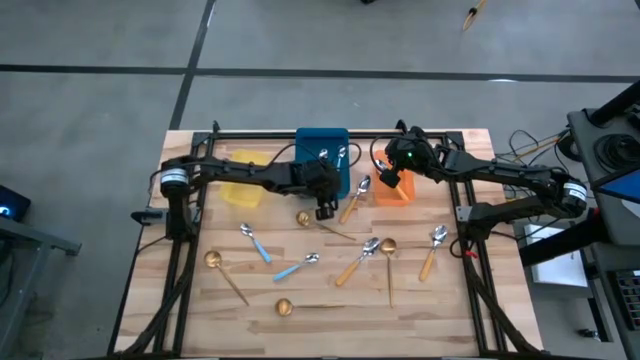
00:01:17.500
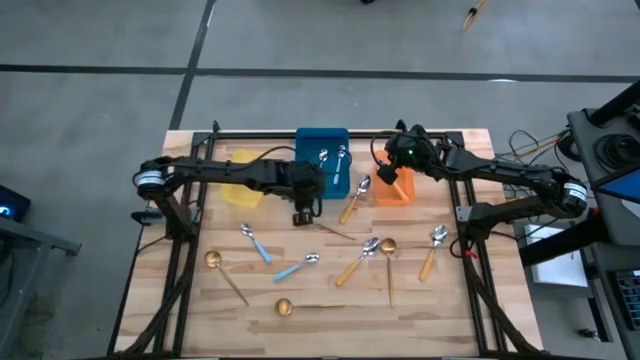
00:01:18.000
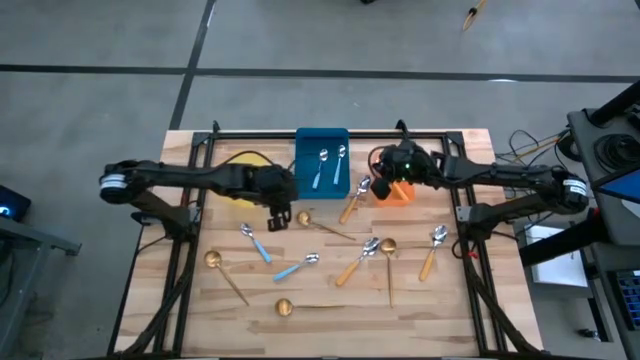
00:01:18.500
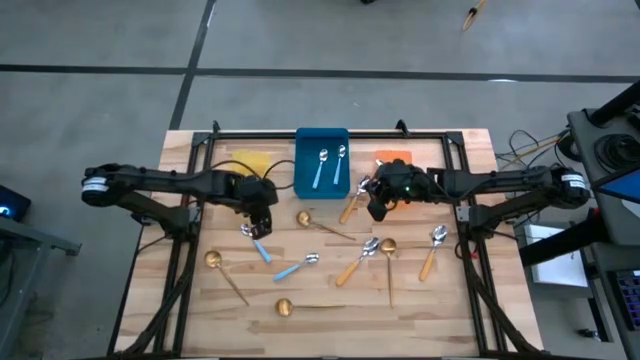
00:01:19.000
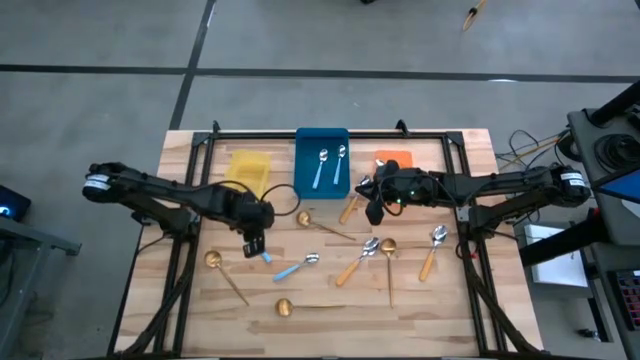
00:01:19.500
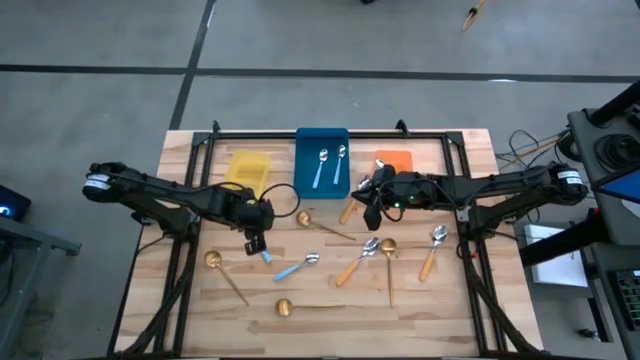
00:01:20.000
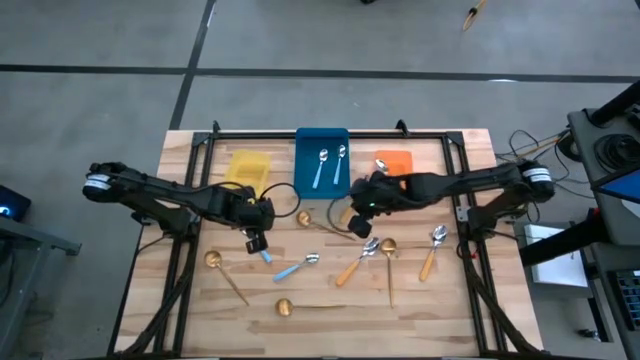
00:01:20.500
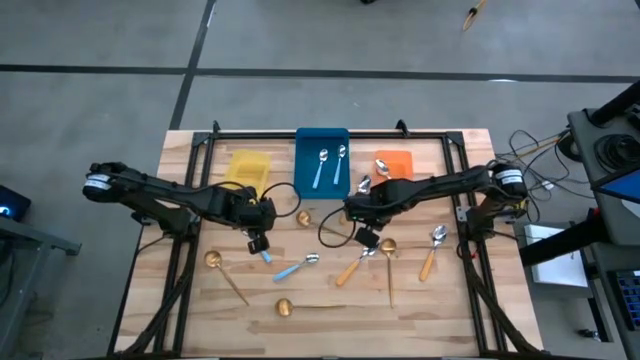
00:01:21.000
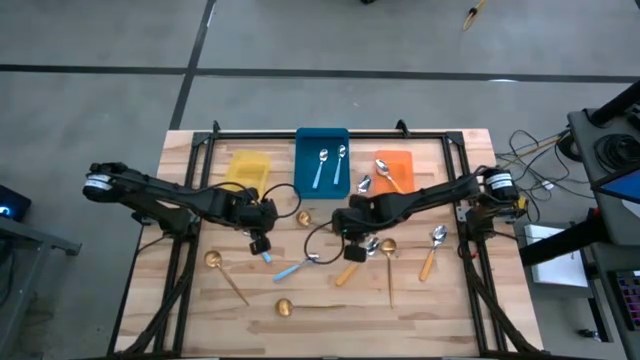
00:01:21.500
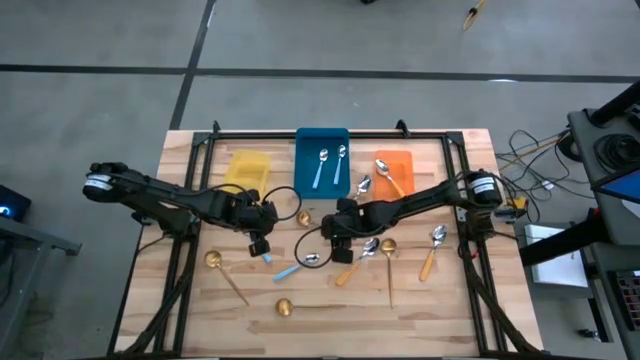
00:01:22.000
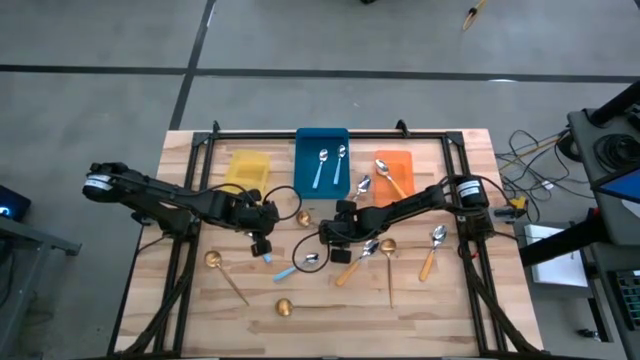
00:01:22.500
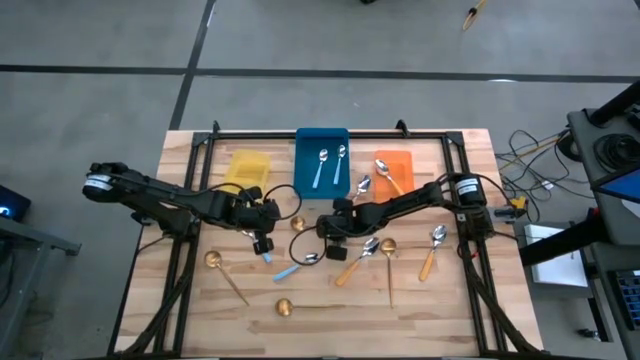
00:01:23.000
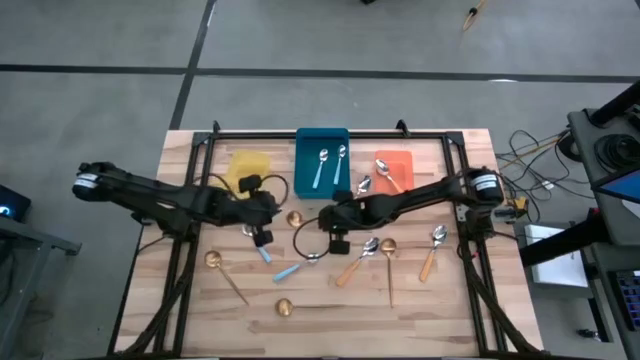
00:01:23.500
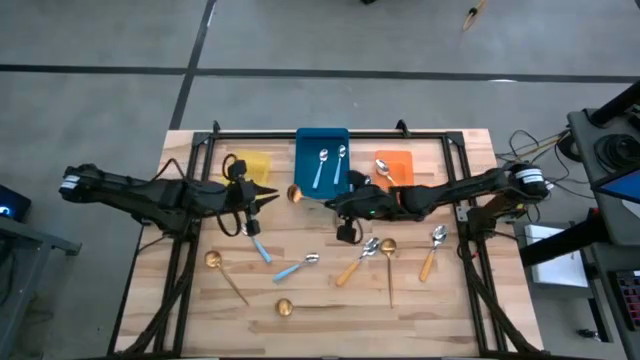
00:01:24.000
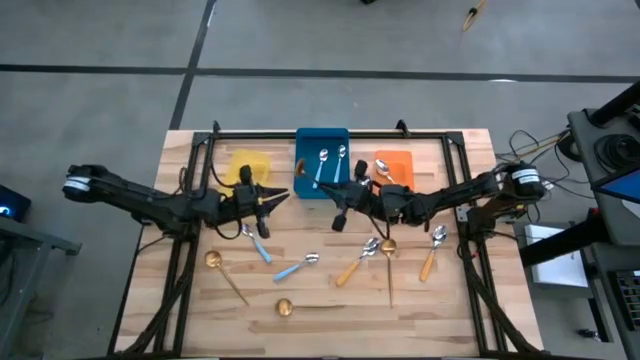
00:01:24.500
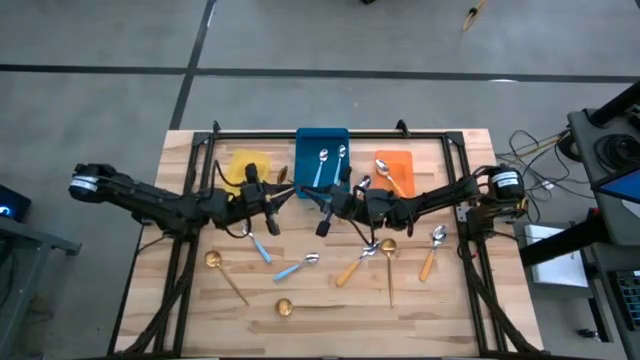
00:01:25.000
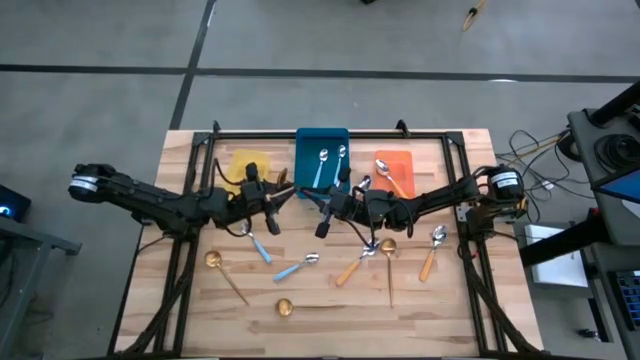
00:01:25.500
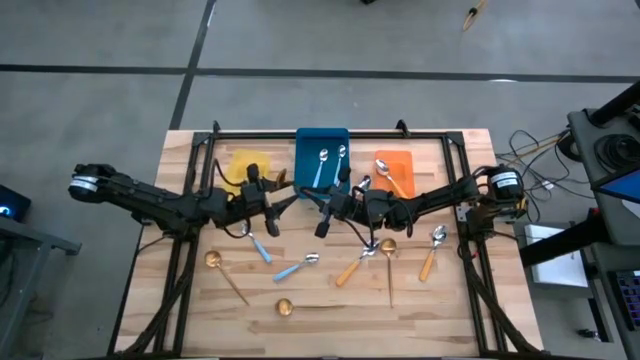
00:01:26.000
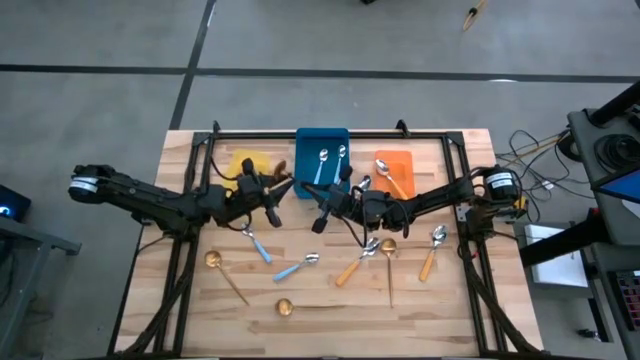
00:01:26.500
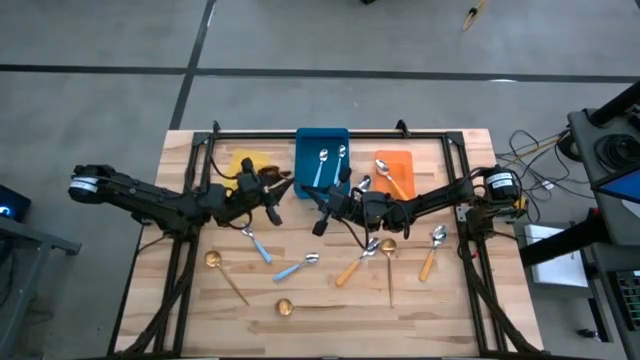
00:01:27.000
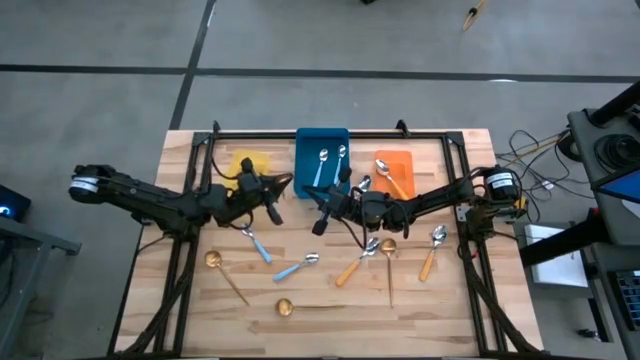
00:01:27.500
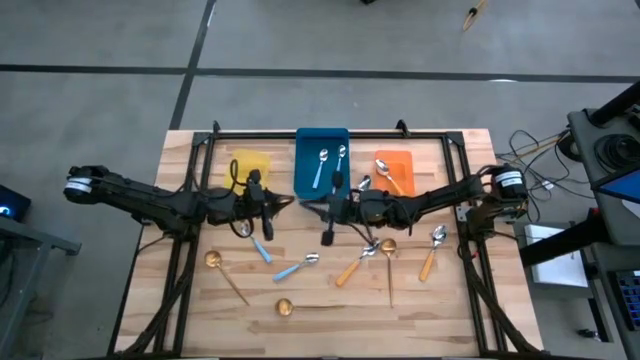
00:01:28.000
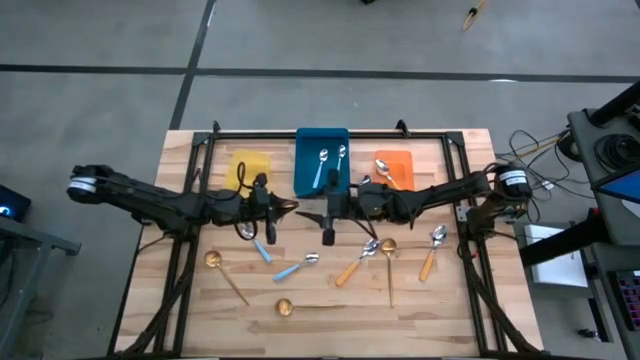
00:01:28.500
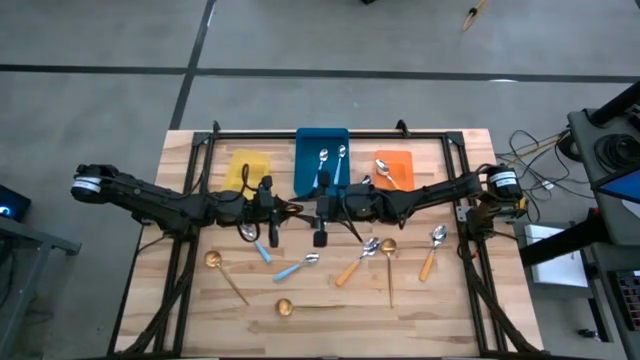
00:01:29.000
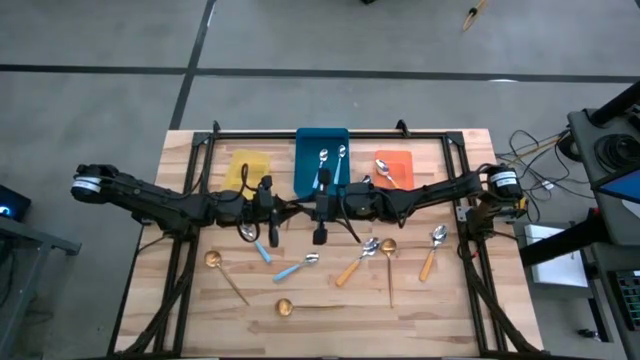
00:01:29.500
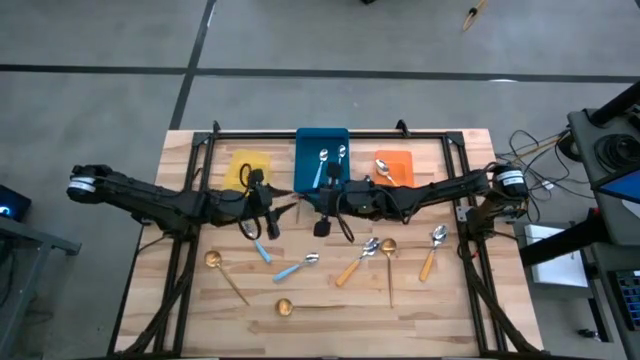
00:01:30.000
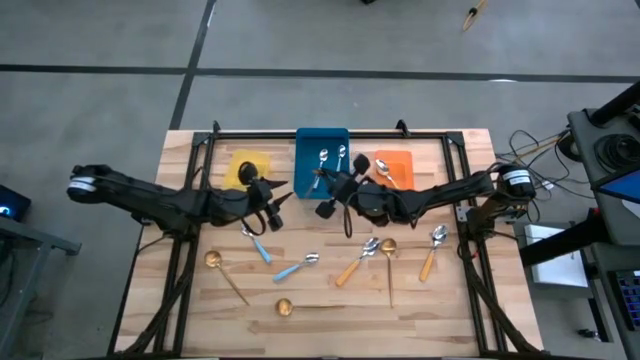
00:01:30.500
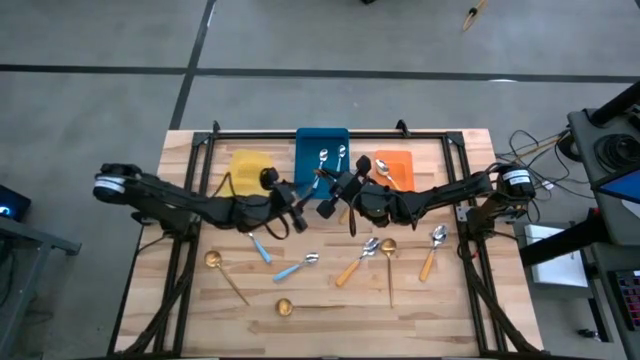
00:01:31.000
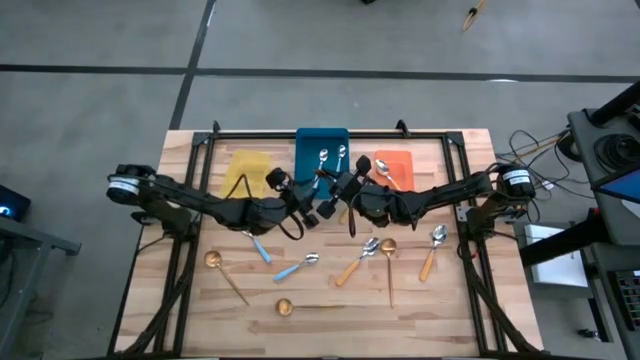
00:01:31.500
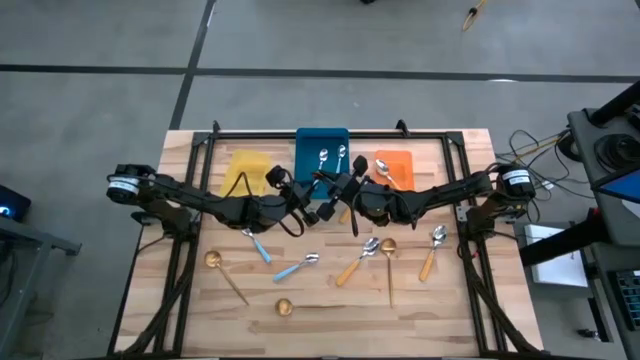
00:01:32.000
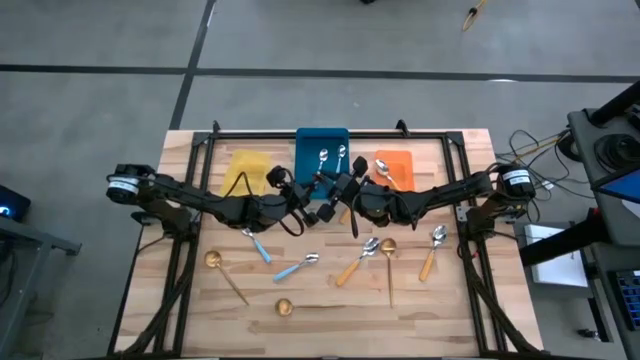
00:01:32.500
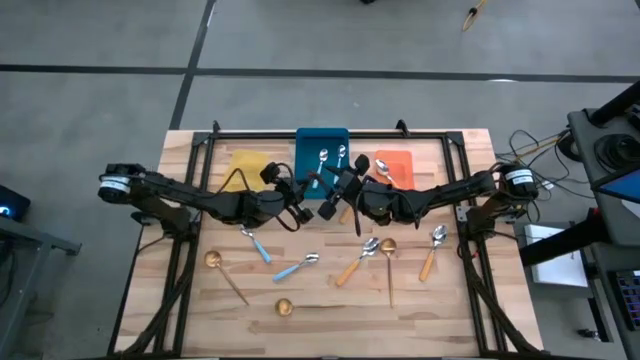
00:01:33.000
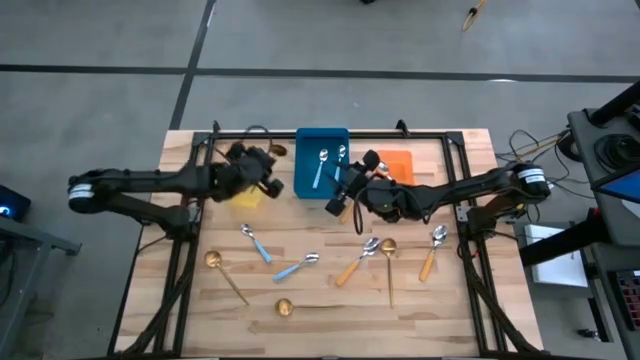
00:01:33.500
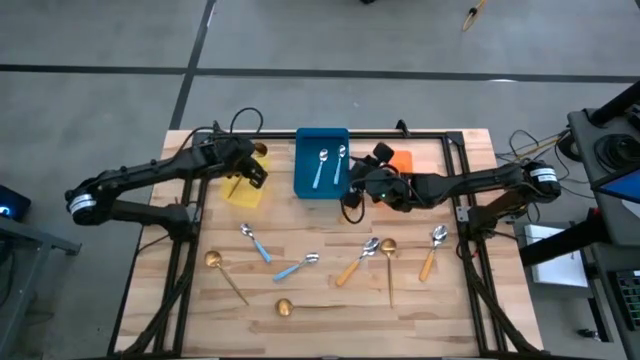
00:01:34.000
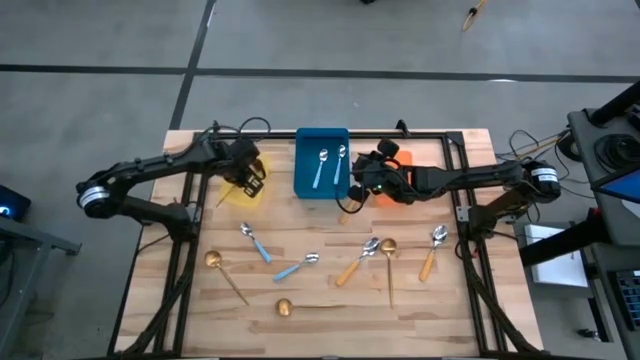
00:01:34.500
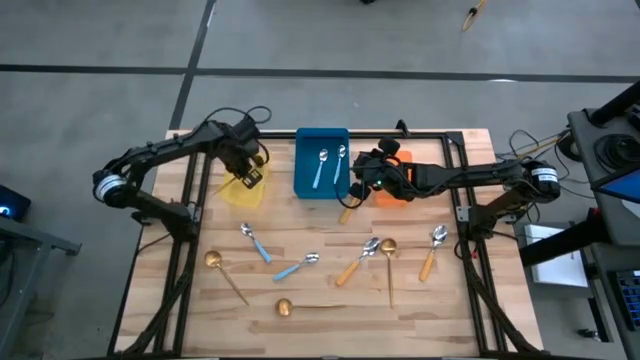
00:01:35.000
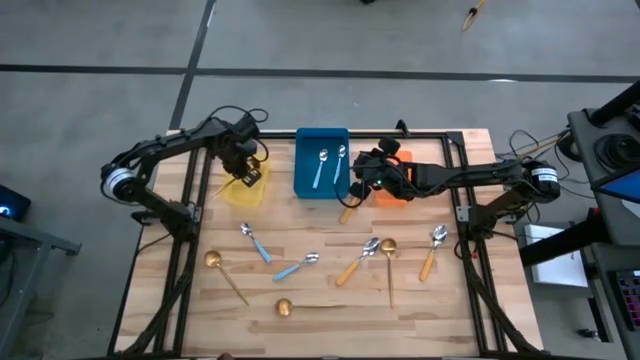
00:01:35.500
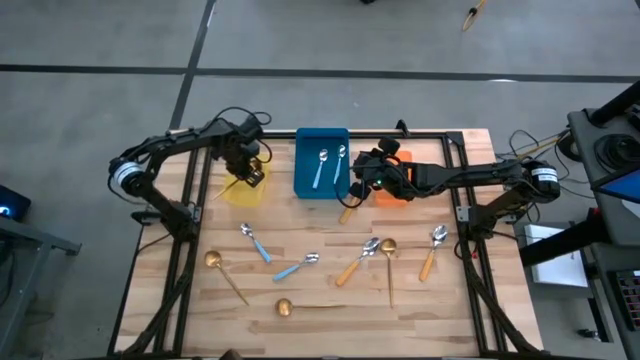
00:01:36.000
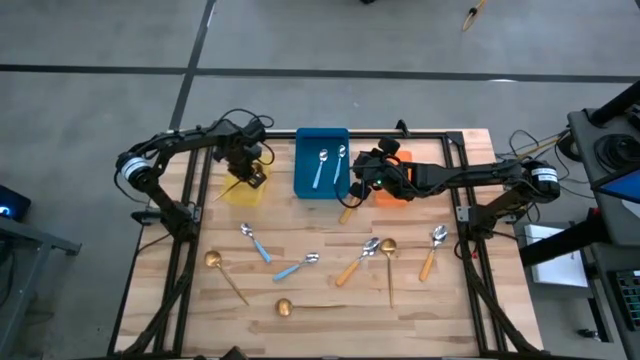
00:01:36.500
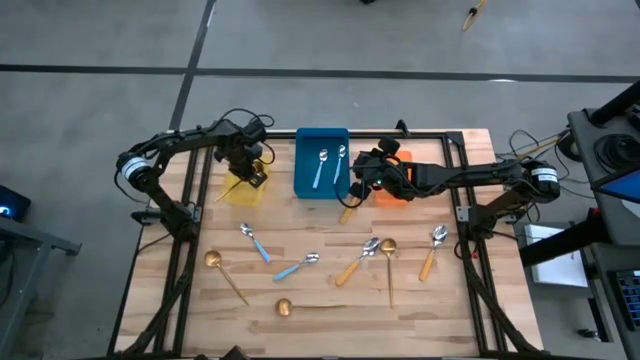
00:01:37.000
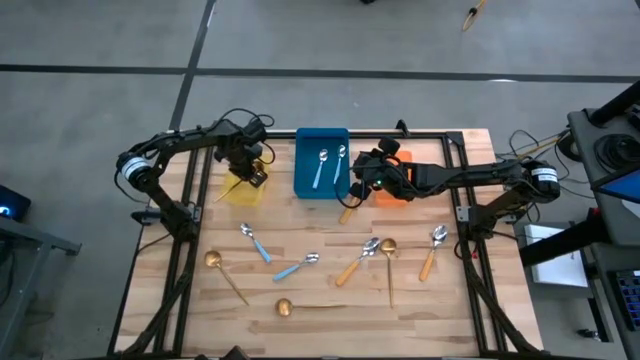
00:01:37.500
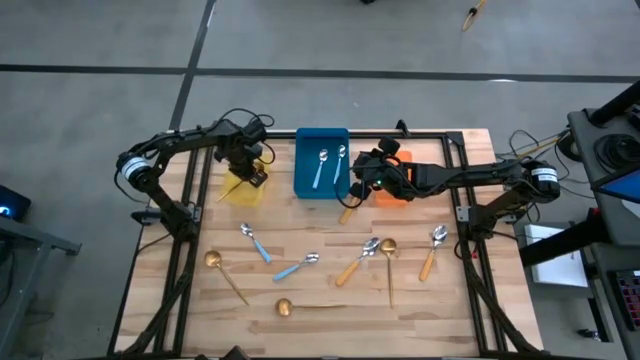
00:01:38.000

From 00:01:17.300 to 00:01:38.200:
Task: Sort silverware by color (type)
Put the gold spoon into the yellow bin
